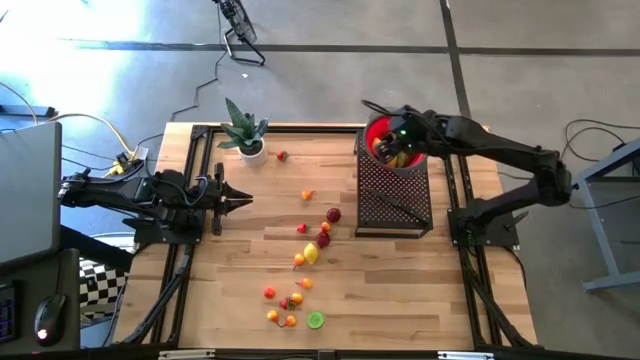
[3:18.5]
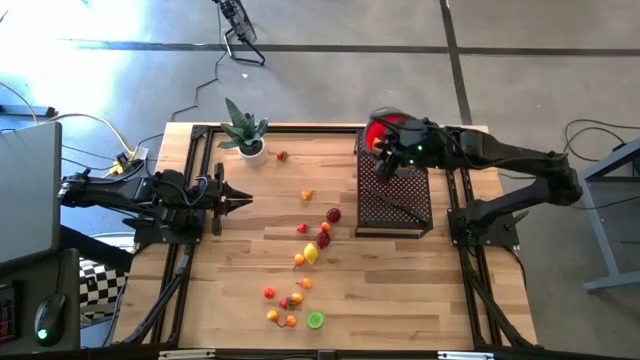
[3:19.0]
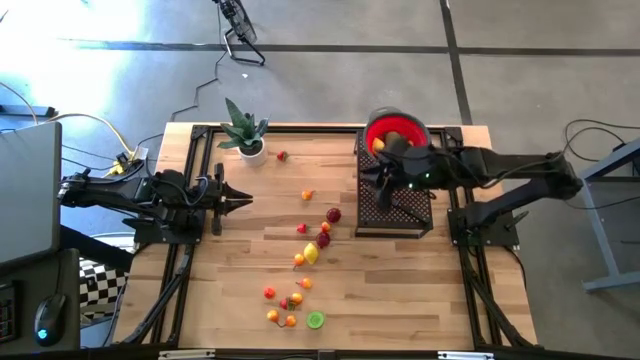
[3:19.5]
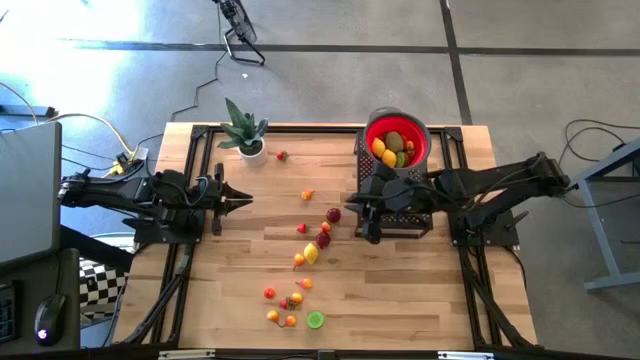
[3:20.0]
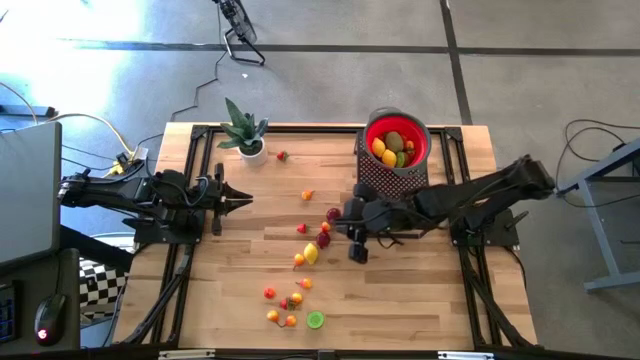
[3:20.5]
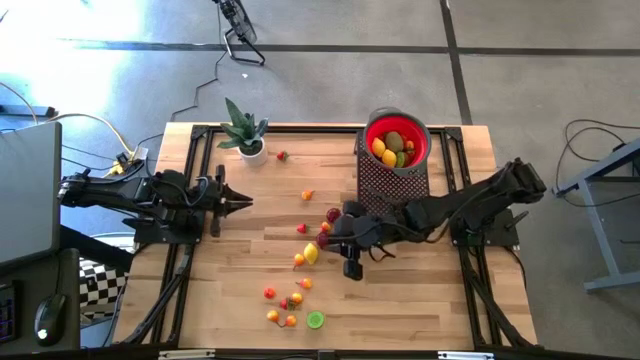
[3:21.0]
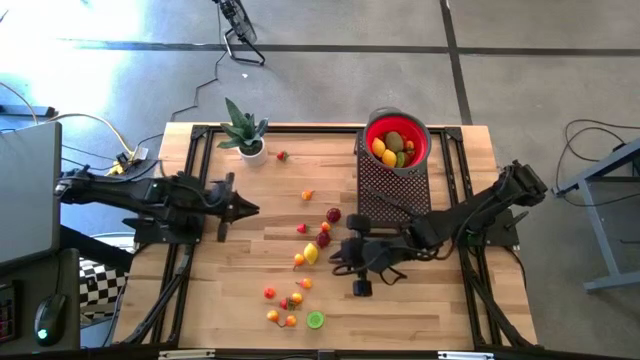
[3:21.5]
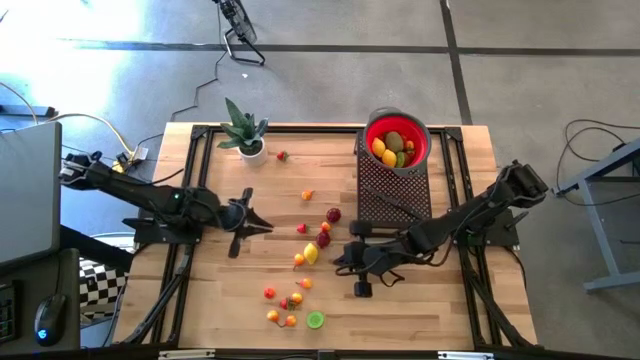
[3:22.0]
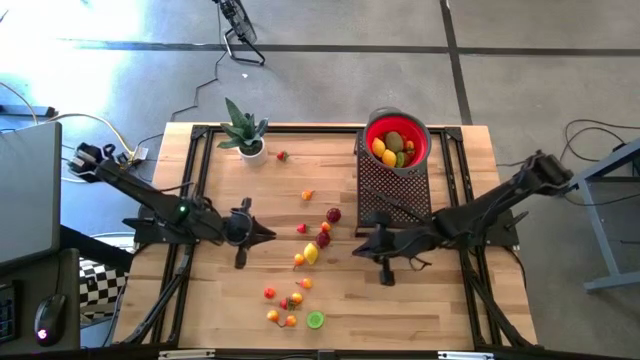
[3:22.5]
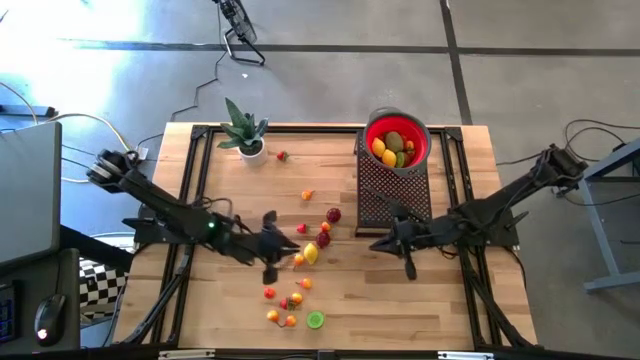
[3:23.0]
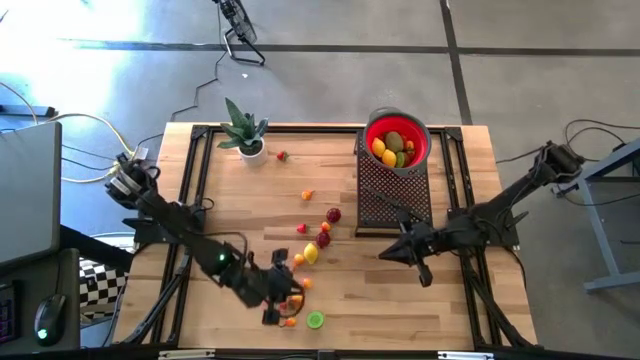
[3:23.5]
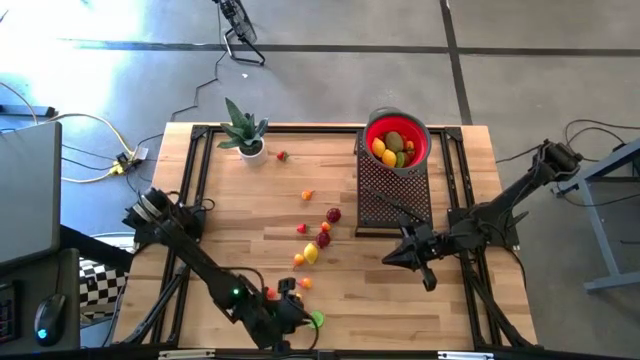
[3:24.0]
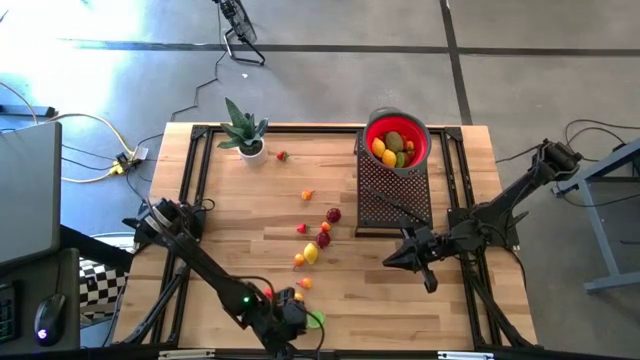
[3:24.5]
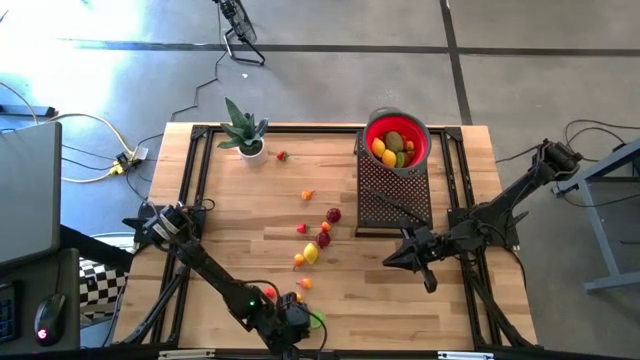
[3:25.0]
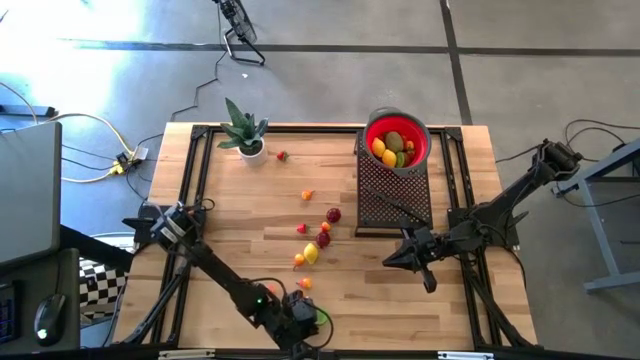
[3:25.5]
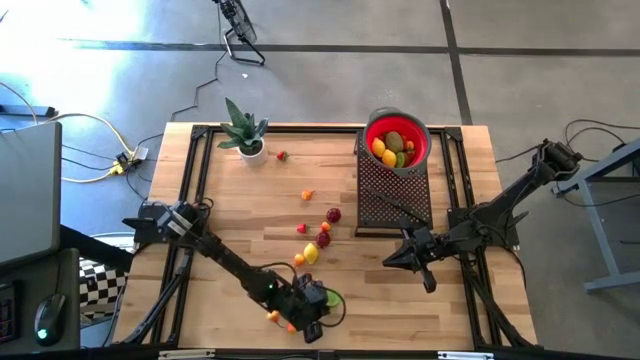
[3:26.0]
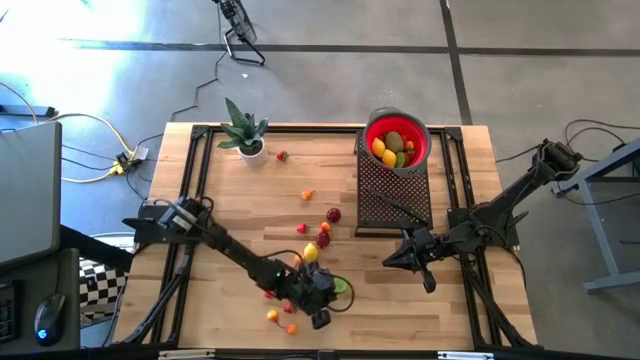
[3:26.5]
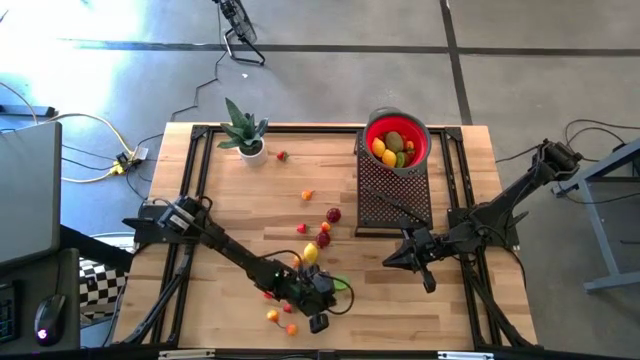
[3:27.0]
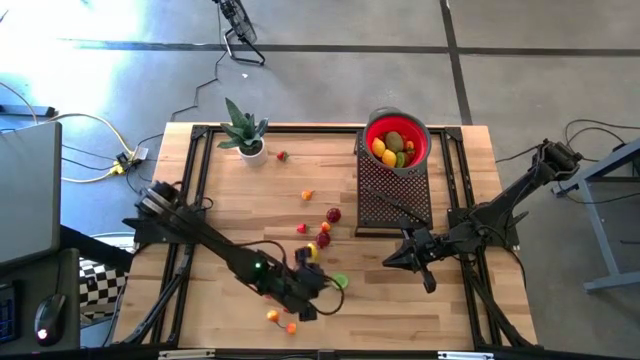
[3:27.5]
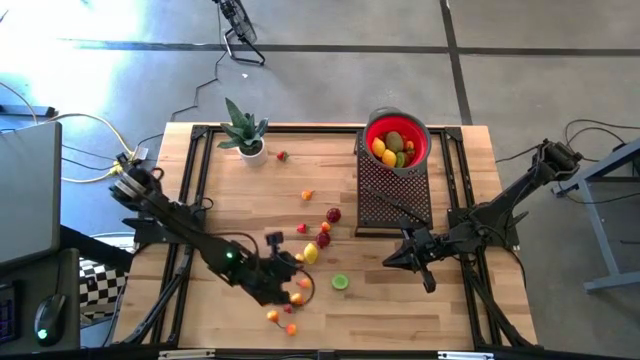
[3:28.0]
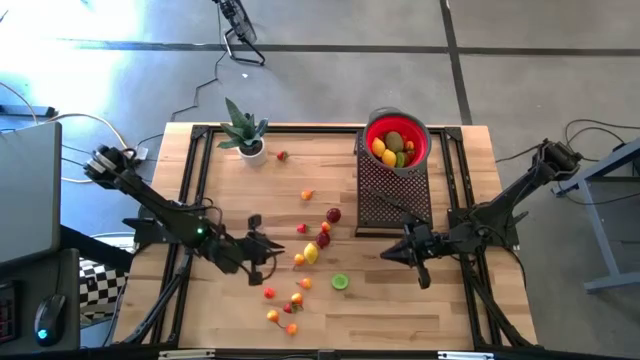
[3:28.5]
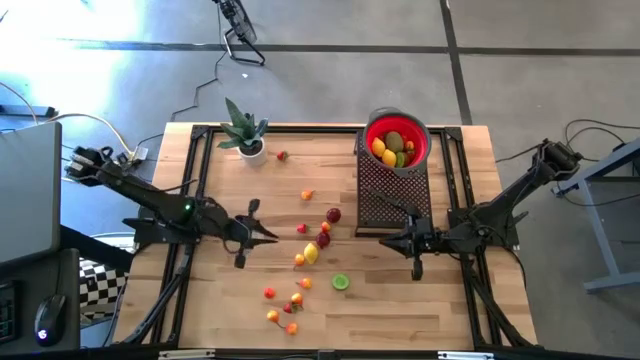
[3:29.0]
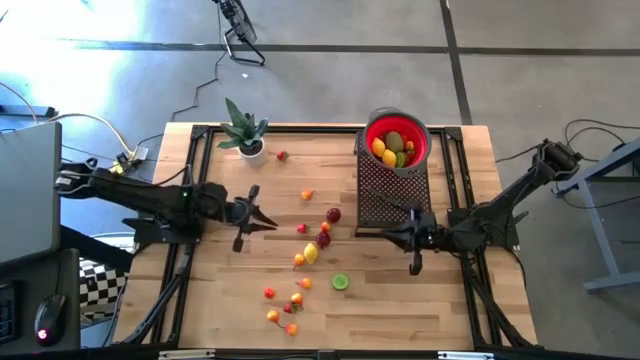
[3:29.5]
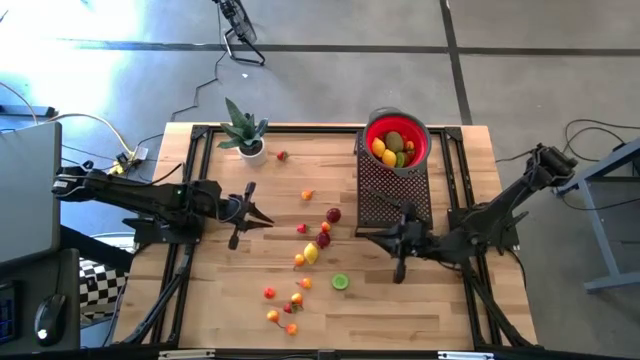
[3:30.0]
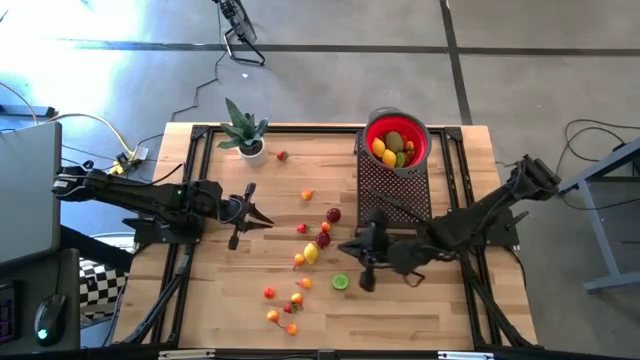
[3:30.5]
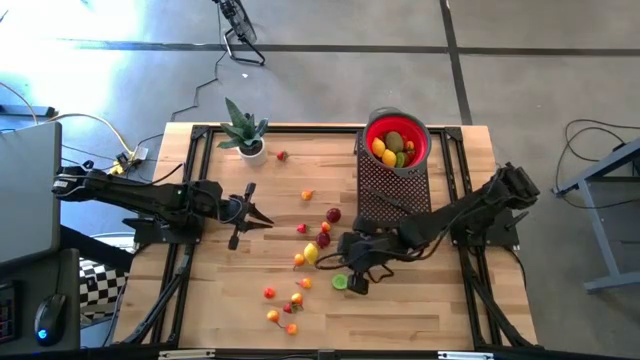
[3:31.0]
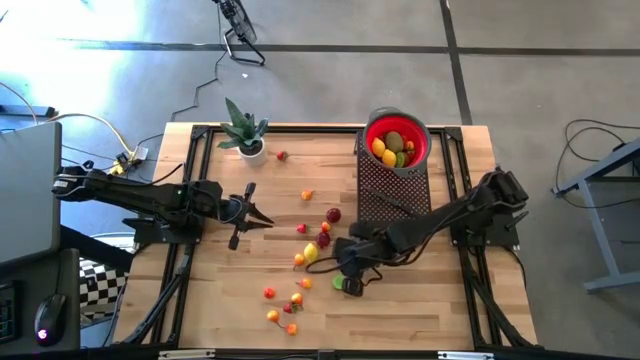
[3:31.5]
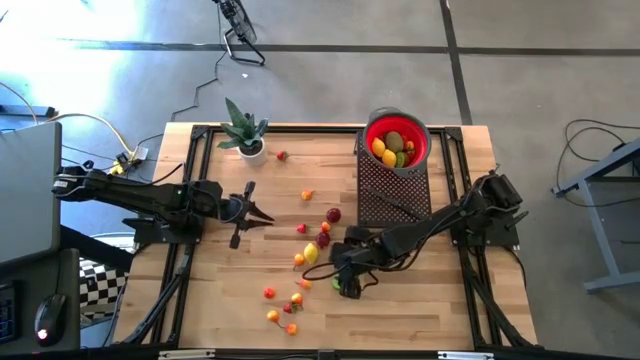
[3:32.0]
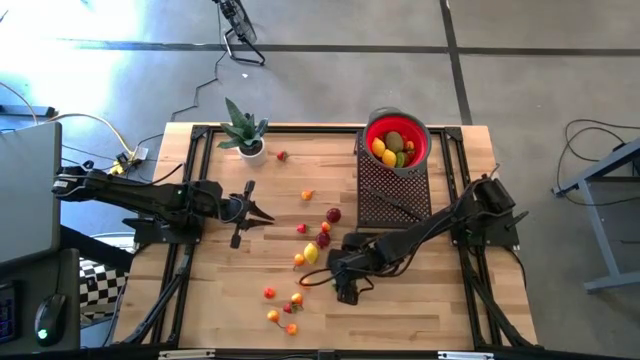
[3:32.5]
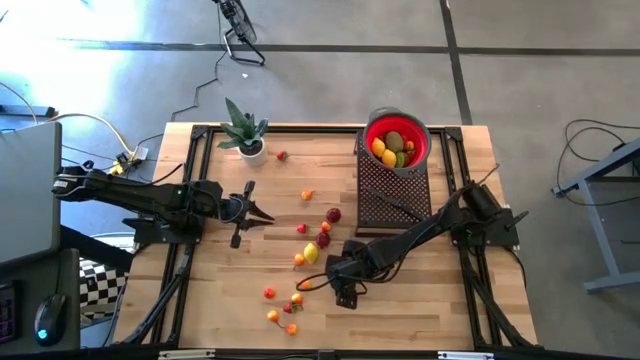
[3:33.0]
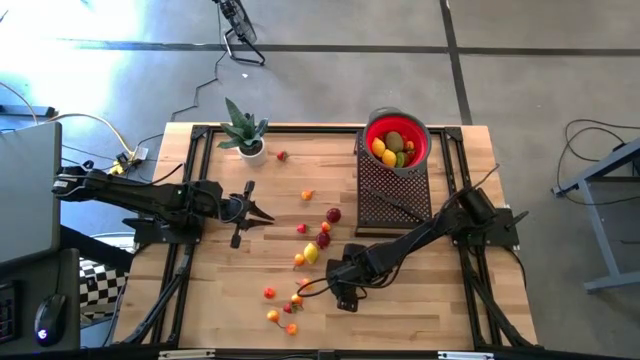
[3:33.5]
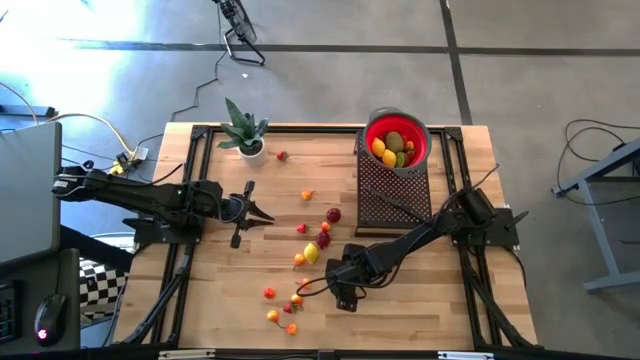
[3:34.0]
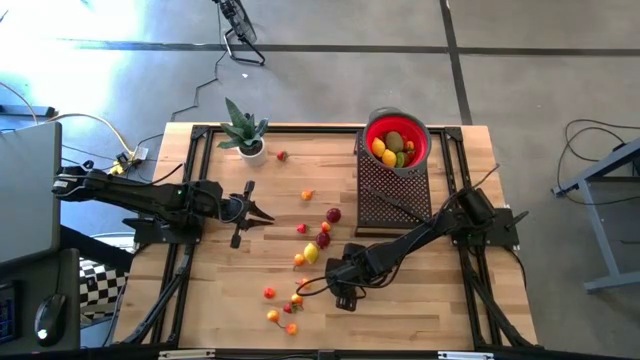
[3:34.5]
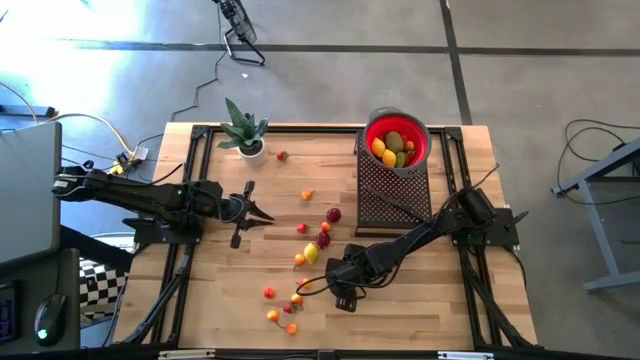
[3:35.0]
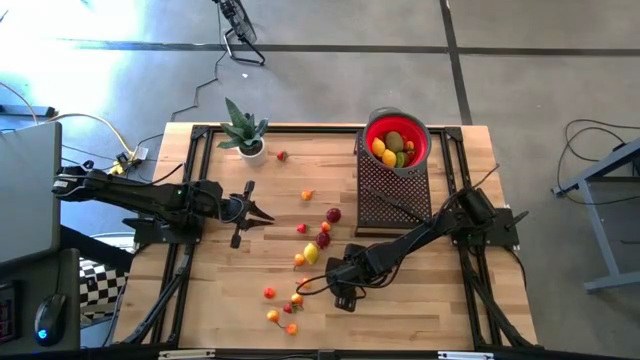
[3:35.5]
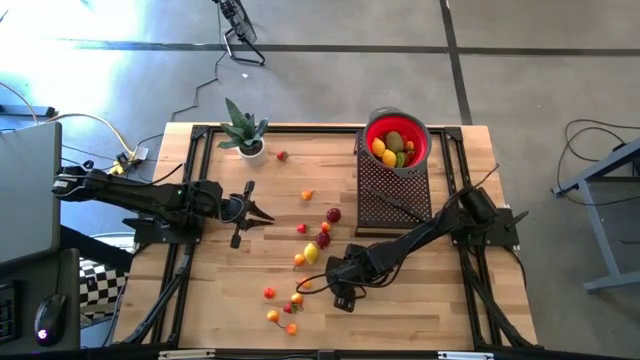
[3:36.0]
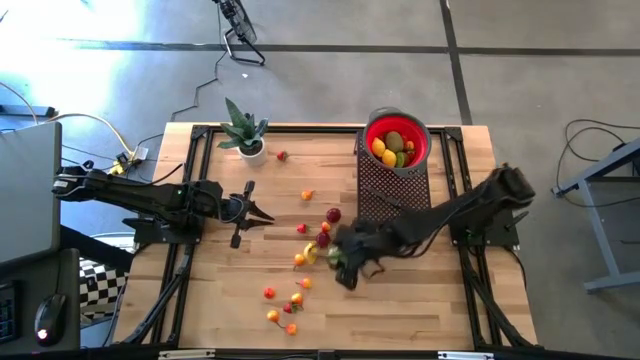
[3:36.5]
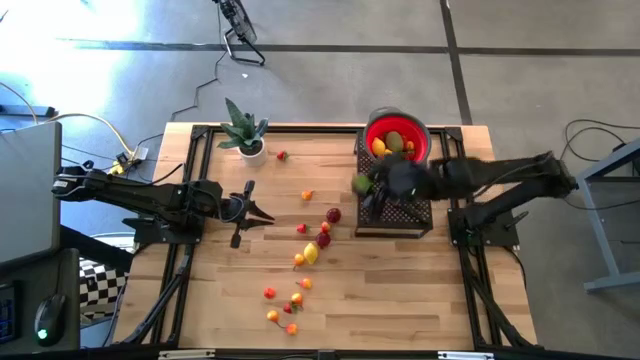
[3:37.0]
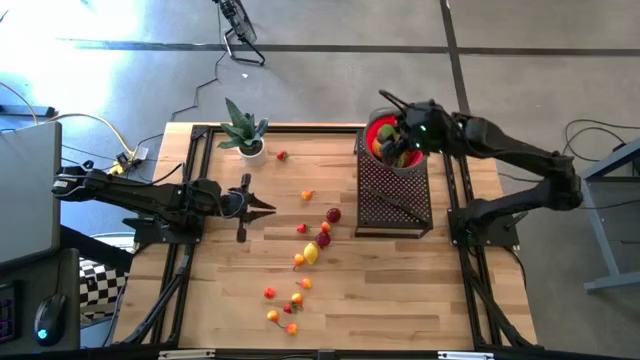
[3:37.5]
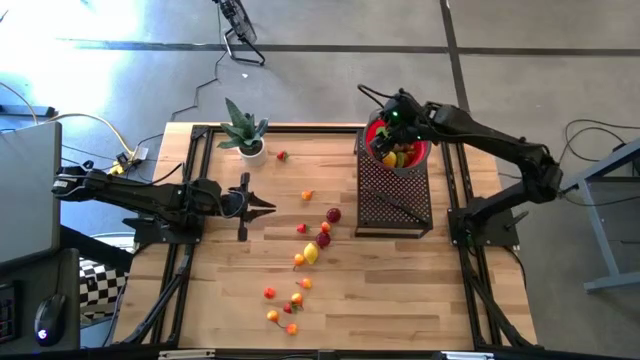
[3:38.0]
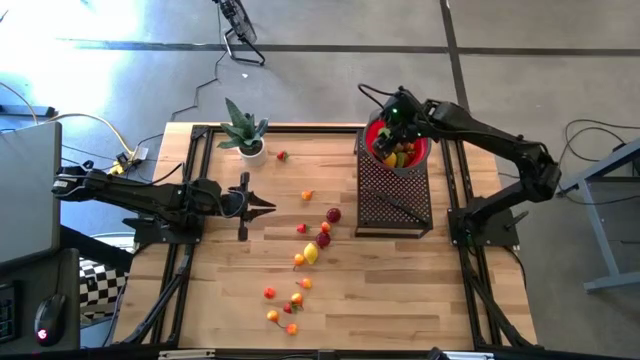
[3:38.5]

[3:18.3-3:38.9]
Task: Pick & Place Fruit
Put the kiwi into the strainer bowl on the shelf
